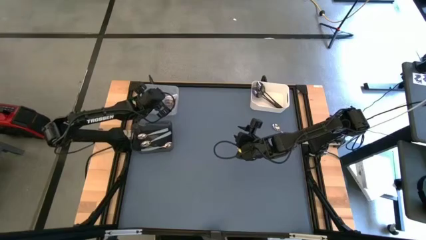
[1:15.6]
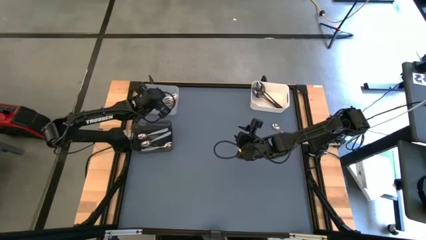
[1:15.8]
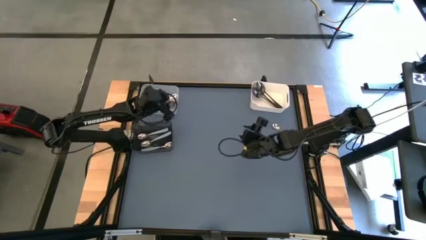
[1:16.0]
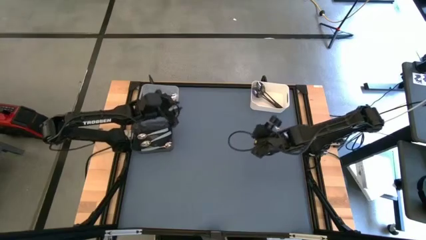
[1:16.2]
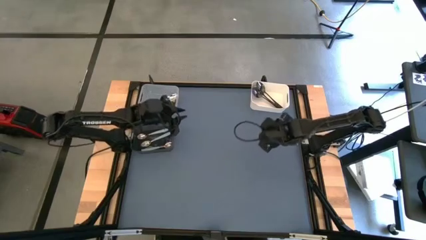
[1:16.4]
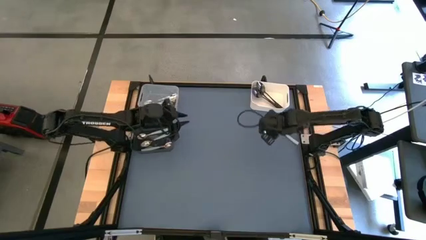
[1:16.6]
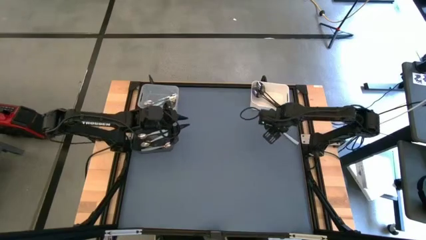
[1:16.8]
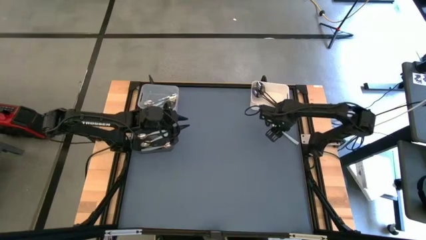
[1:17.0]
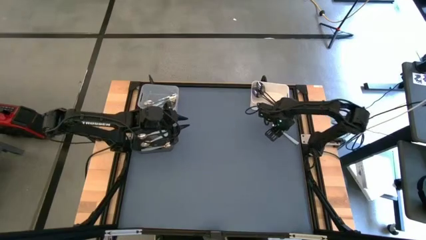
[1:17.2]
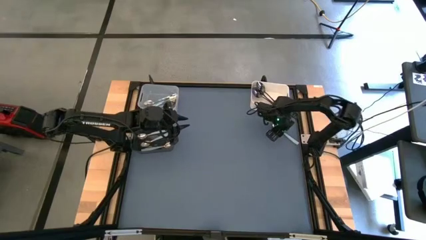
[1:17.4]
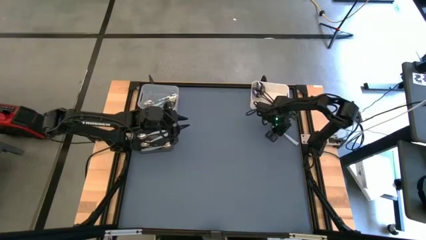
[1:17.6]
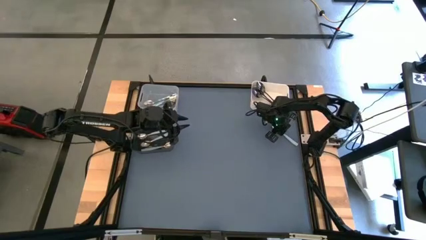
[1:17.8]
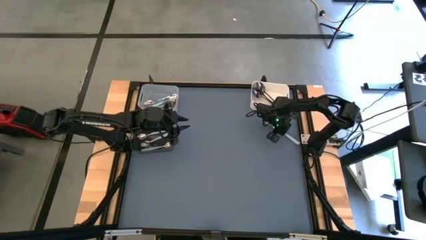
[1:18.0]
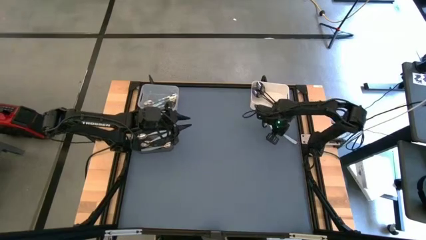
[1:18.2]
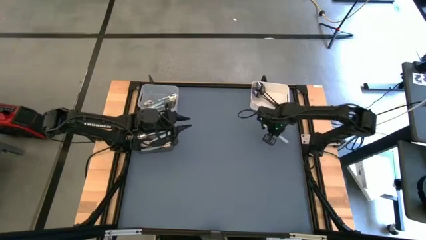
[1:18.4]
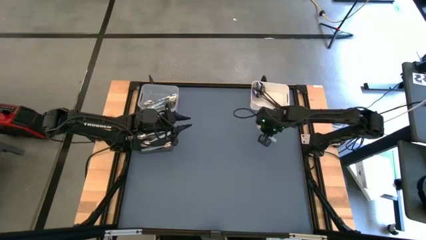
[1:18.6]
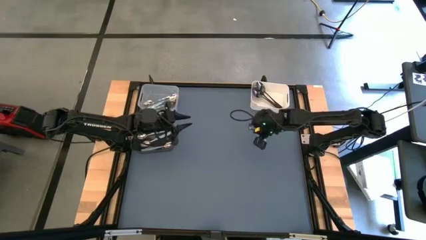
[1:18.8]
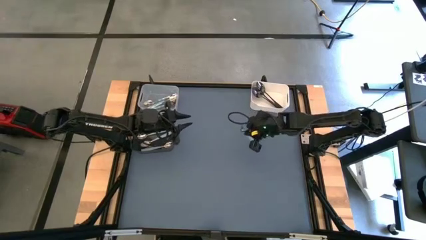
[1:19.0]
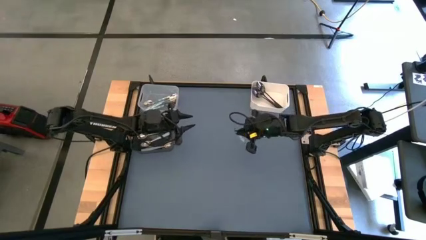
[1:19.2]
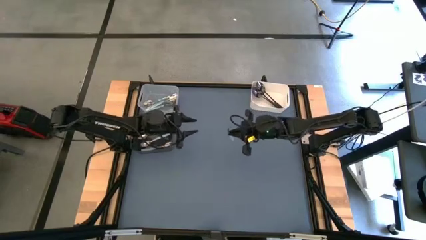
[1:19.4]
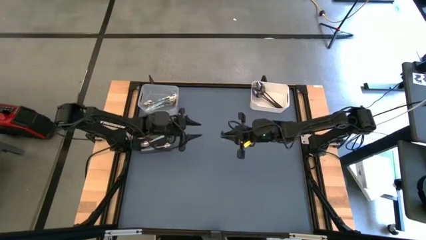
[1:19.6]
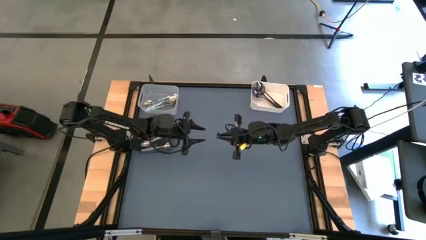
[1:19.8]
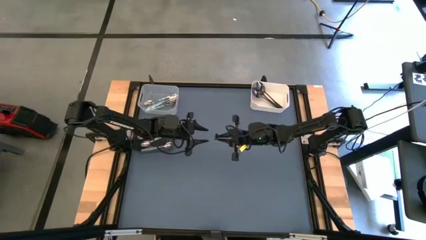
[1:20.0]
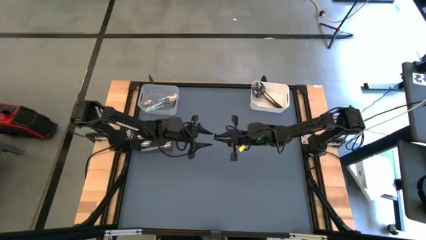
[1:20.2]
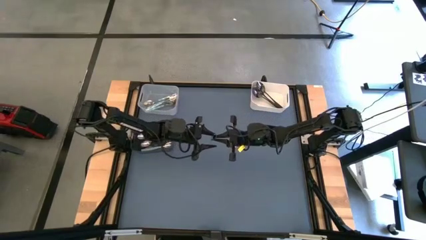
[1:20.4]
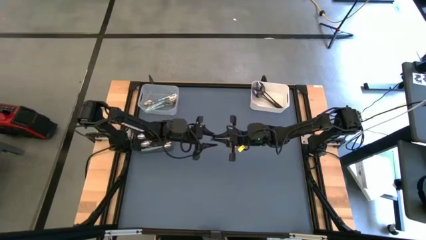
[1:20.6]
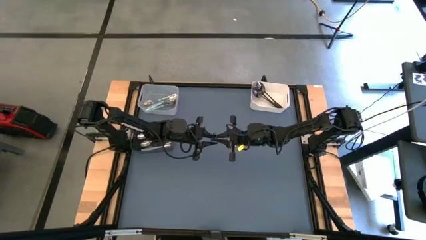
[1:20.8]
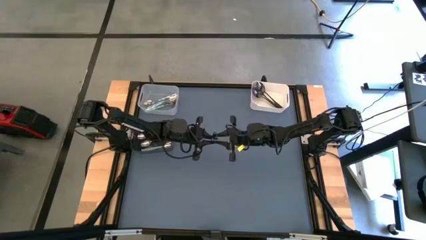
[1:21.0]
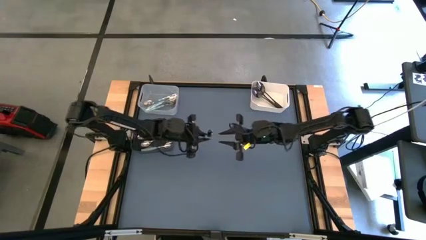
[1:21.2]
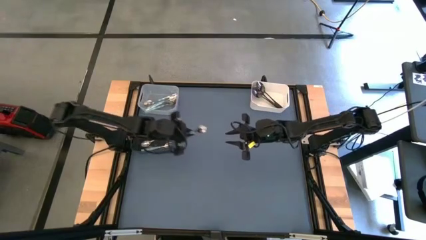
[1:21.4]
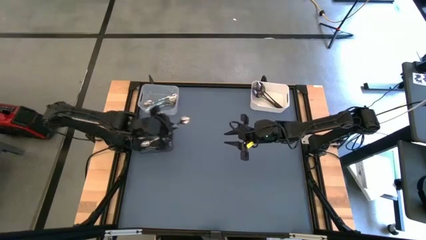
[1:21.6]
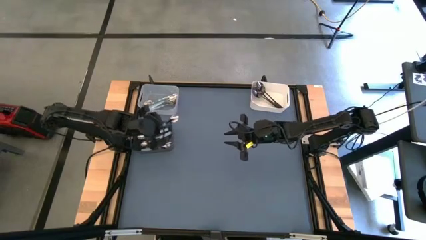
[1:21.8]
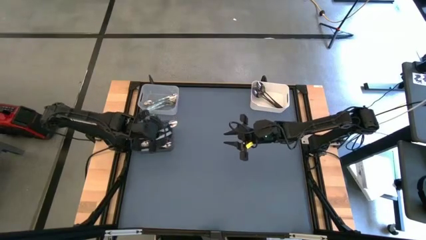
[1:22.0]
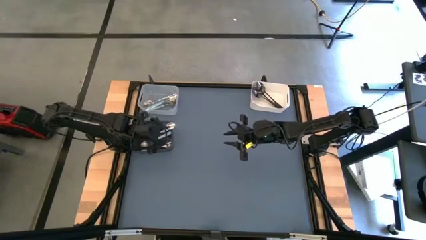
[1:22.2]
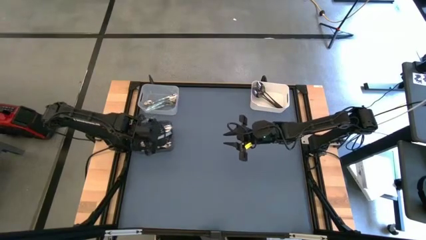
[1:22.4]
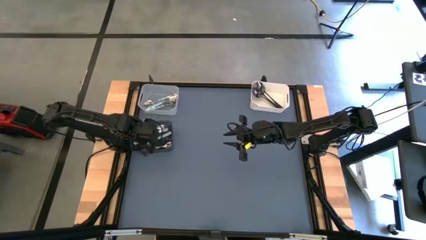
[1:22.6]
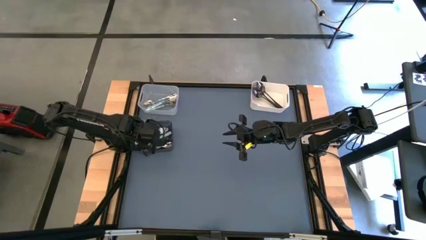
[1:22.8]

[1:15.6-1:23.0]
Task: Sort silverware by color (type)
Put the blue spoon into the black bin

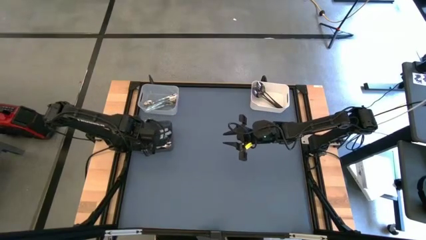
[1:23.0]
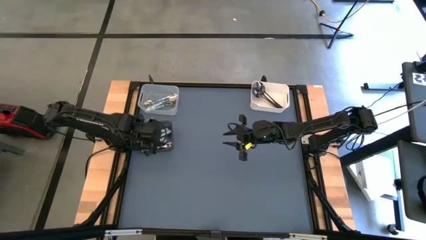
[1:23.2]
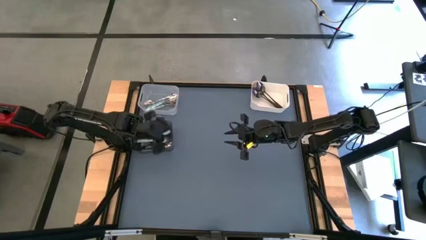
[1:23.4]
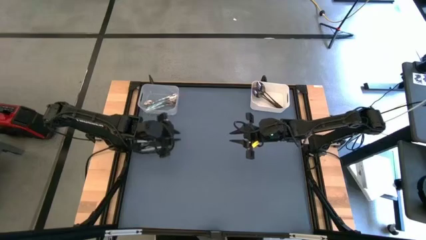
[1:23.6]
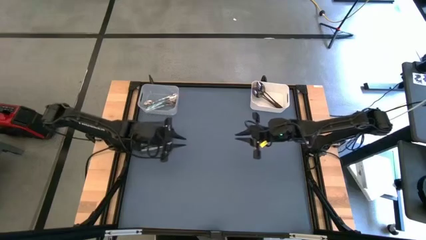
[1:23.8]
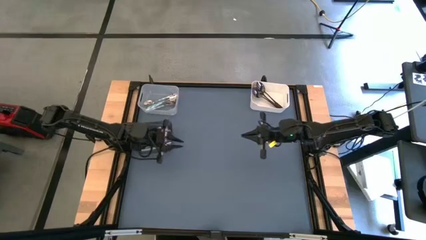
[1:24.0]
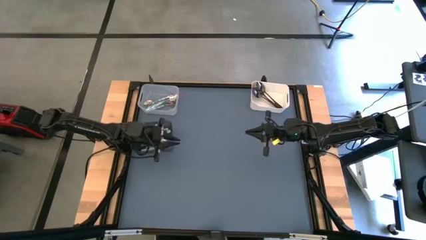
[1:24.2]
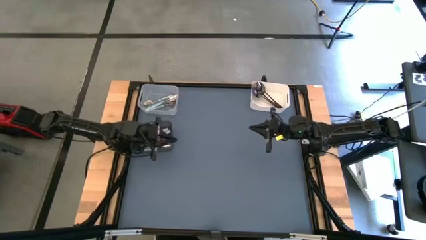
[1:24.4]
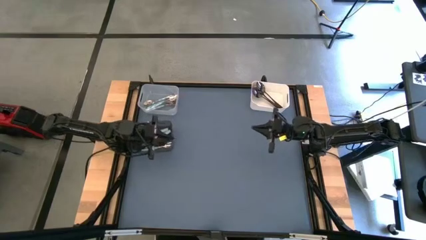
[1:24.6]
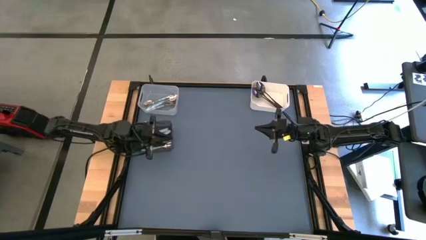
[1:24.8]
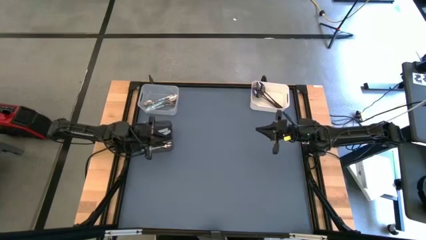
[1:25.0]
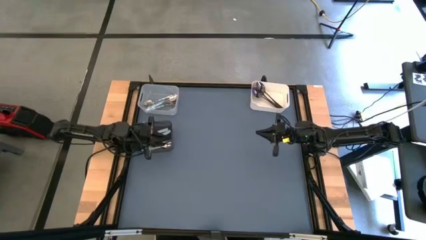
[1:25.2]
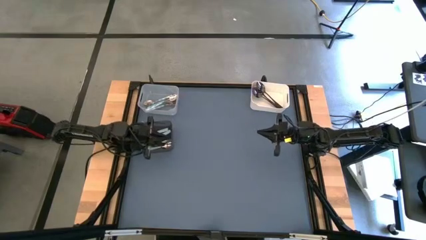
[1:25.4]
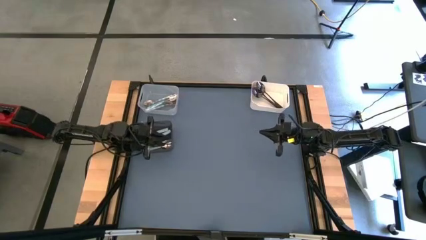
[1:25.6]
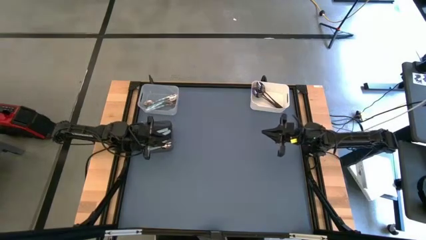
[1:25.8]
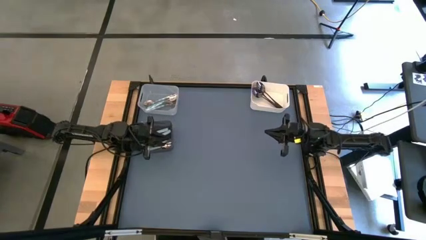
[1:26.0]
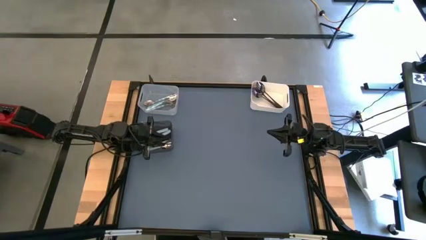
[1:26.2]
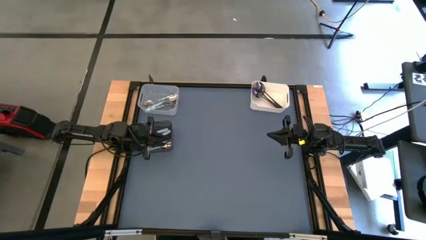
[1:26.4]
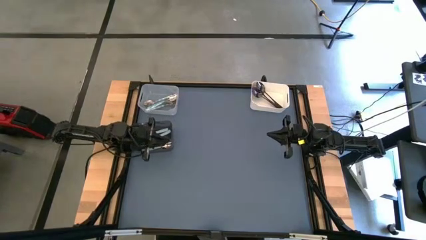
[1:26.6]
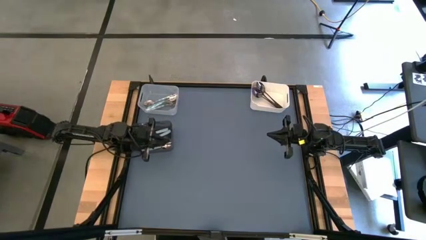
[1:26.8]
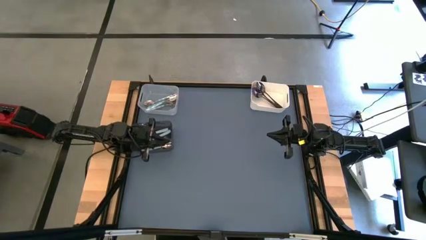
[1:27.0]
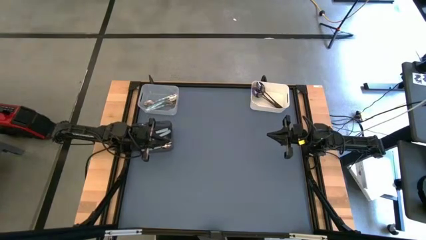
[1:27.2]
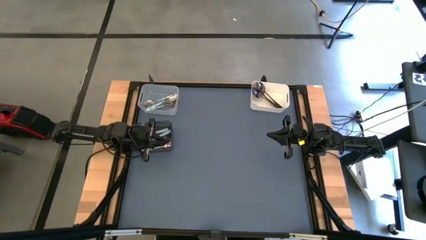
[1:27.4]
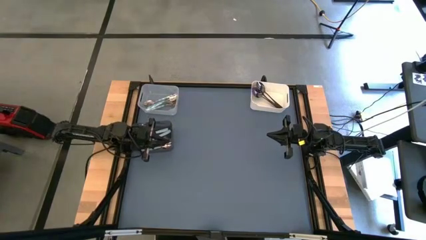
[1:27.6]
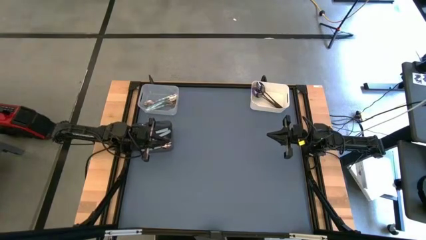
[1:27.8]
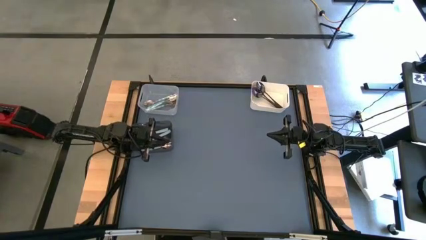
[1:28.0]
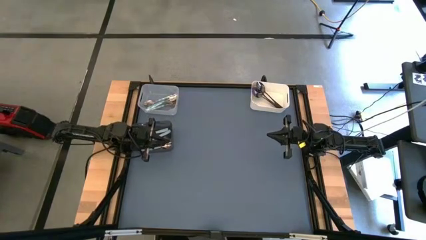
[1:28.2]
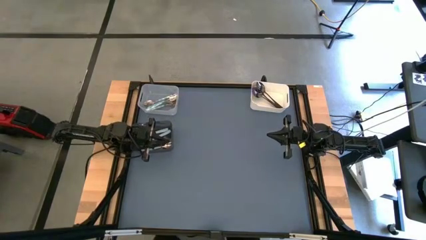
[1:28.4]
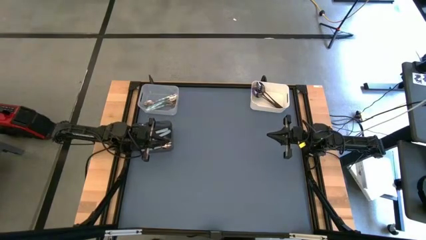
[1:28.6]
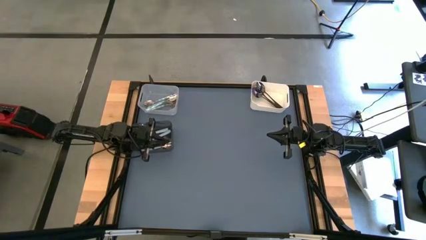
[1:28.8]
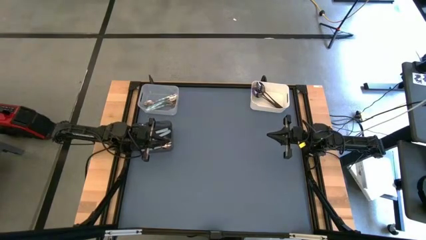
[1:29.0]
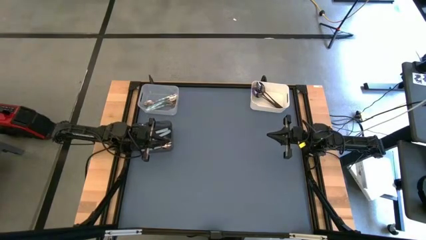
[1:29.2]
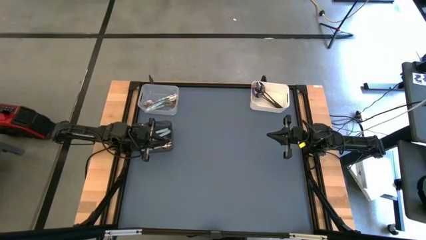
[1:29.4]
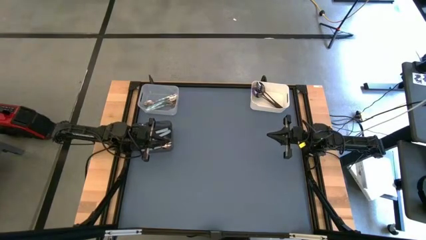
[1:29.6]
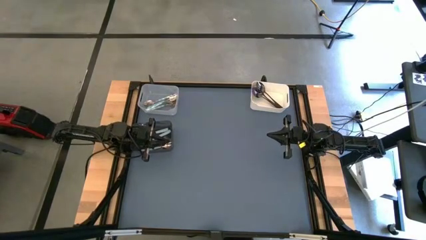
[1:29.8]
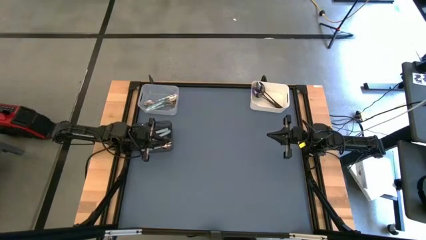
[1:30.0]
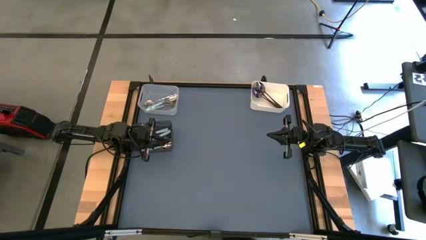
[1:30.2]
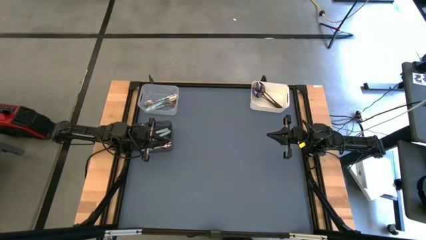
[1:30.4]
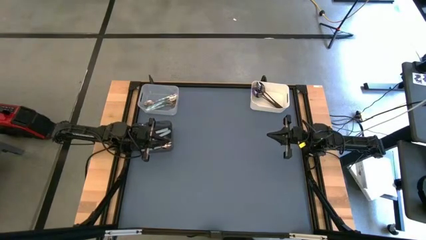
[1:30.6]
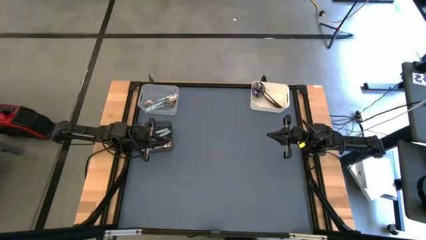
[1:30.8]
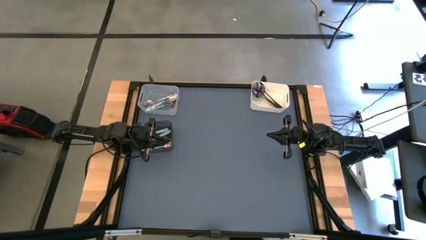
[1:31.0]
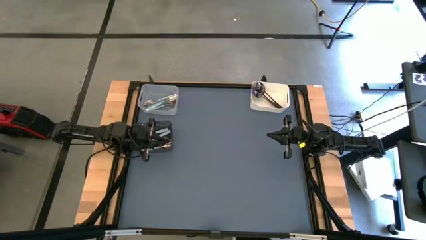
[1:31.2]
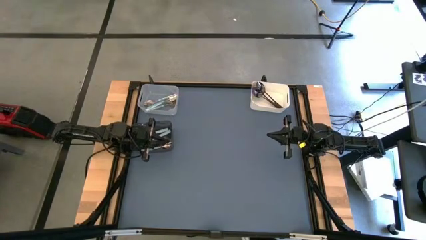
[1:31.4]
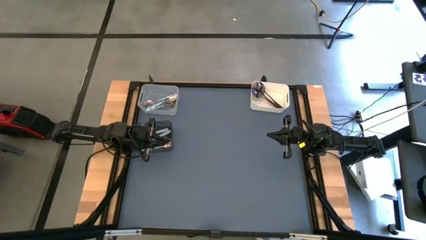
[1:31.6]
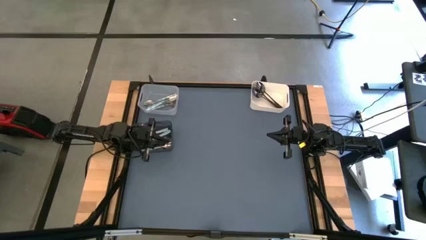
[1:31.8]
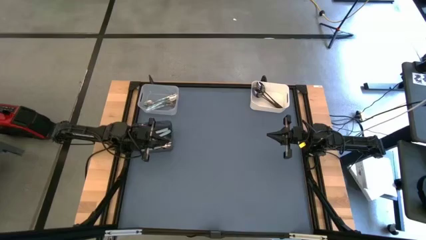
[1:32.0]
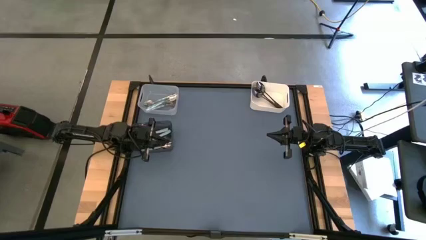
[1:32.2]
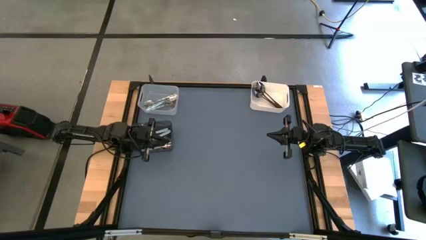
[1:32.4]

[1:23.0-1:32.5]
Return to Home Position

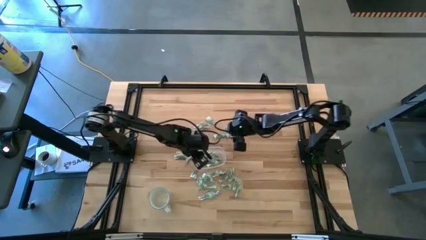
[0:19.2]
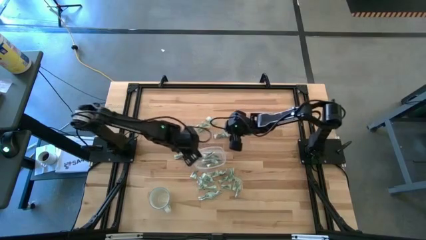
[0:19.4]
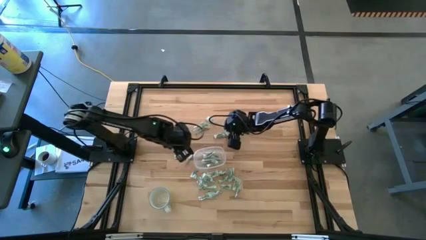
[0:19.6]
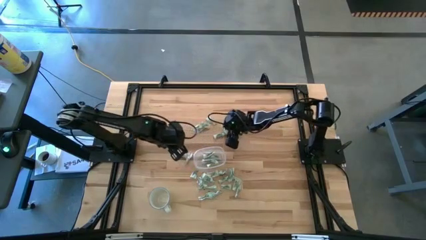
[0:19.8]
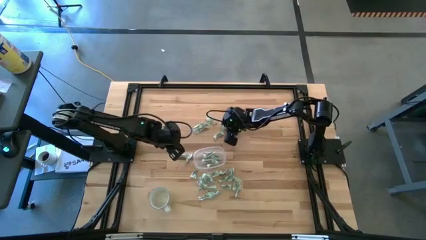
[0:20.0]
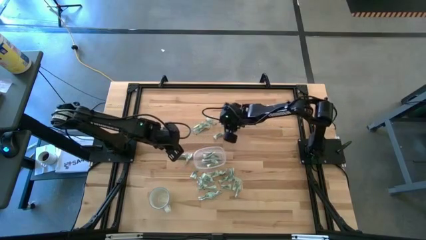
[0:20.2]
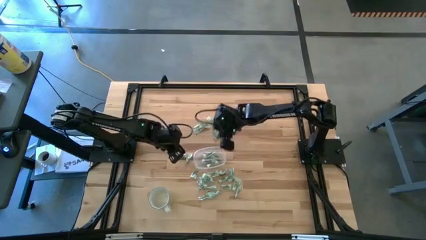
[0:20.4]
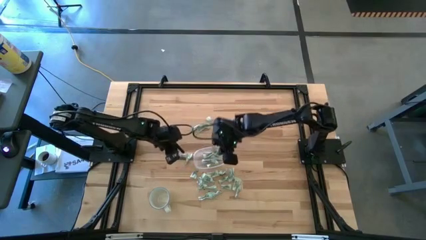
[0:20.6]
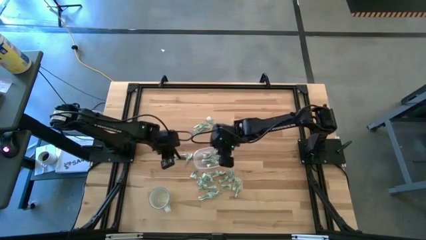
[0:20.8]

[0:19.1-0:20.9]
Task: Pick and place Stevia / Truvia into bins
Put the stevia packet into the transparent container
